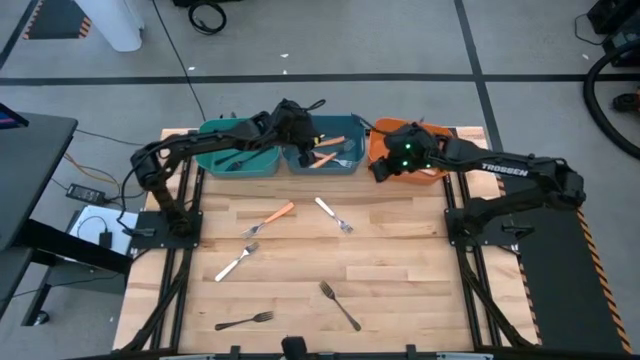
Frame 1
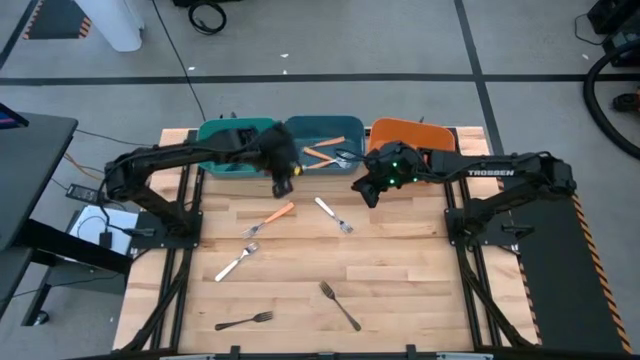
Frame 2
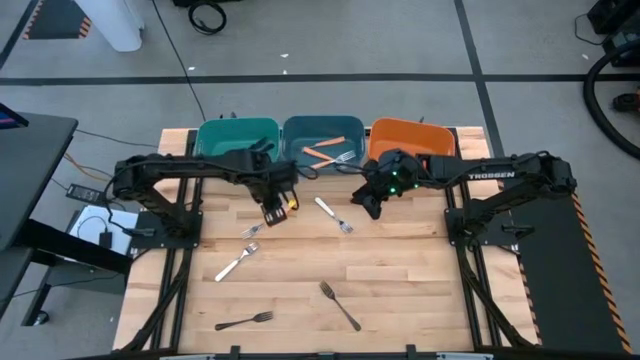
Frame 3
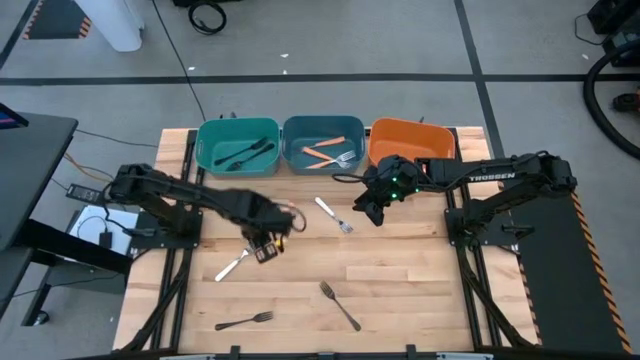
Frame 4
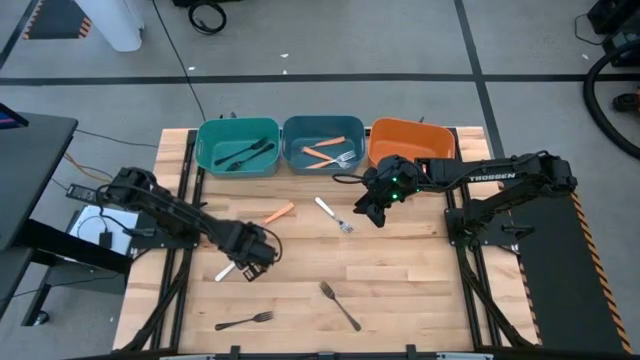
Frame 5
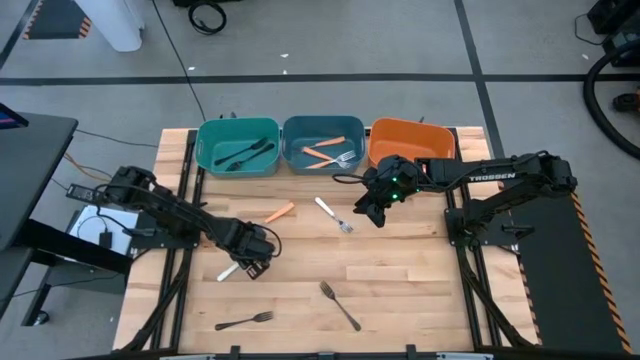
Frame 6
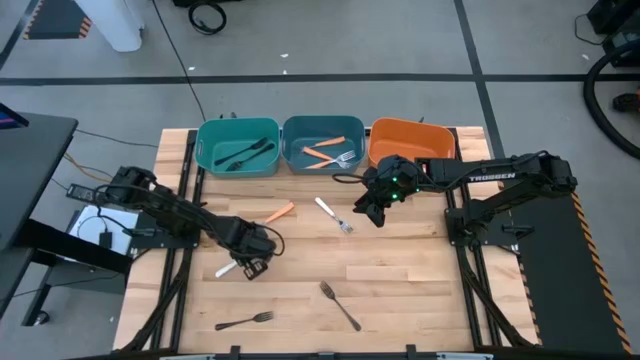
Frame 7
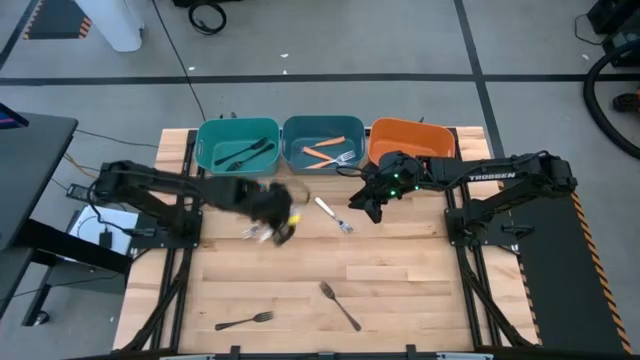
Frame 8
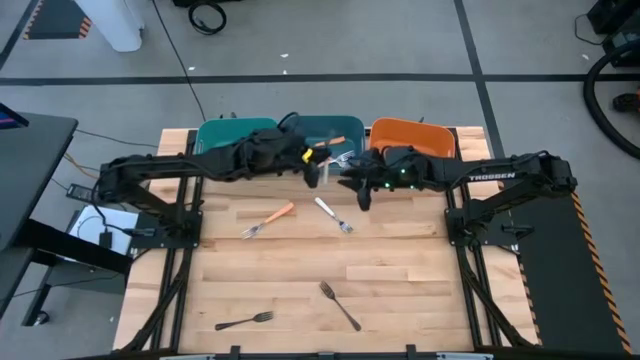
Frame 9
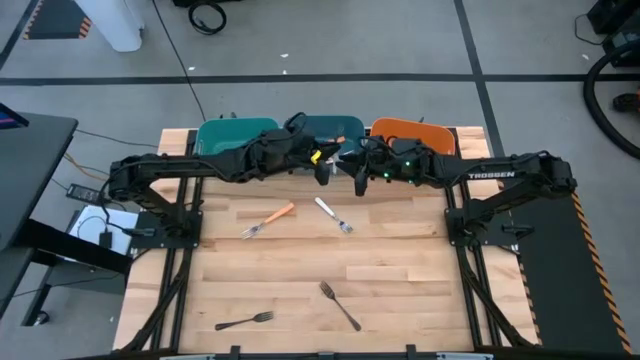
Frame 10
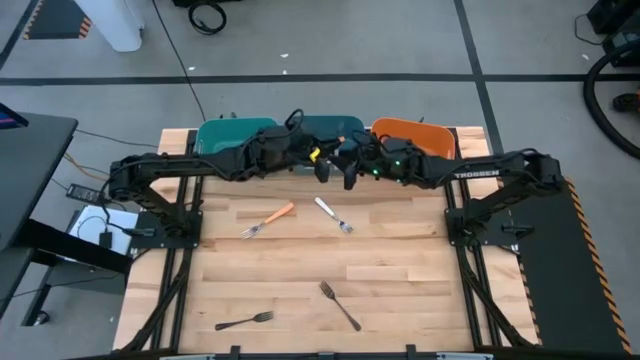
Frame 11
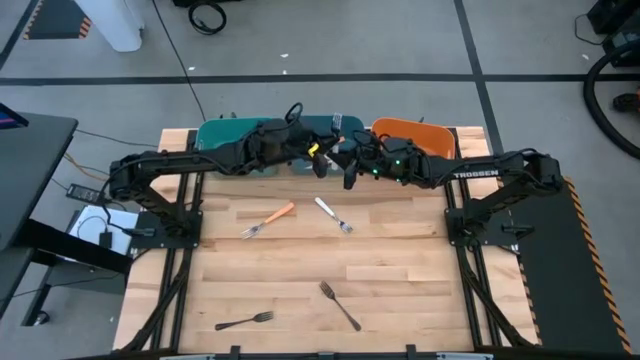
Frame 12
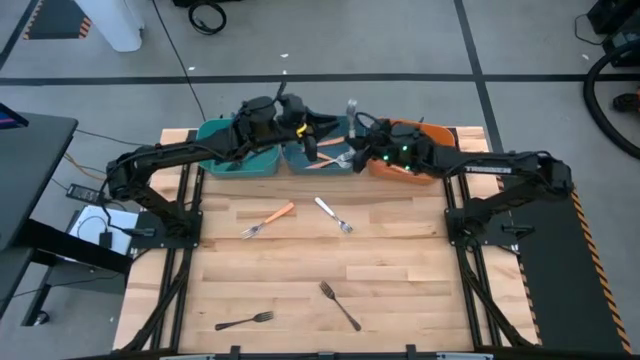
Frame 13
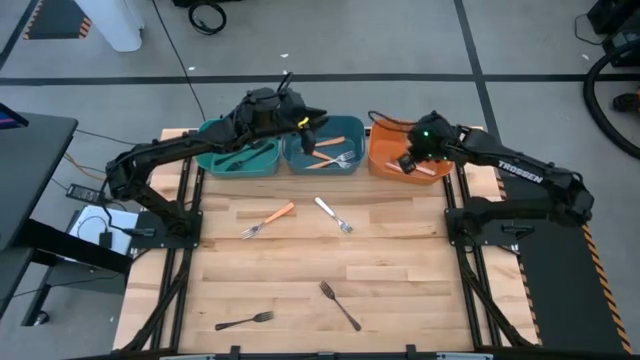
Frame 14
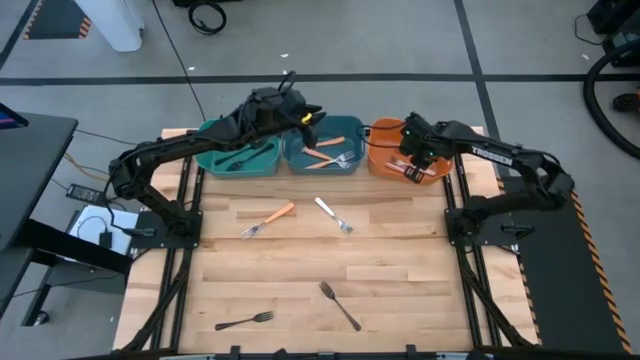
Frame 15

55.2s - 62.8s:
Task: Sort silverware by color (type)
Put the left white fork in the orange bin

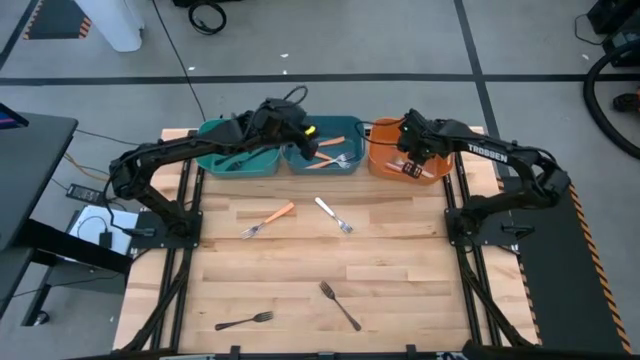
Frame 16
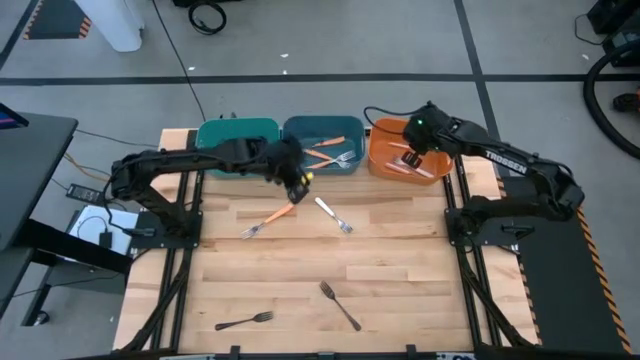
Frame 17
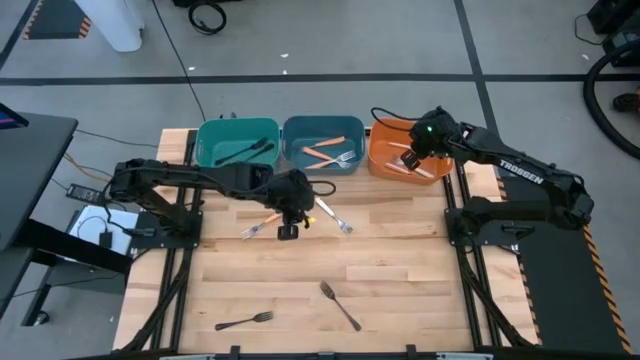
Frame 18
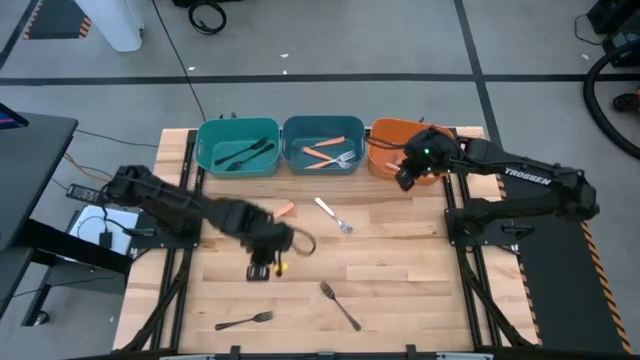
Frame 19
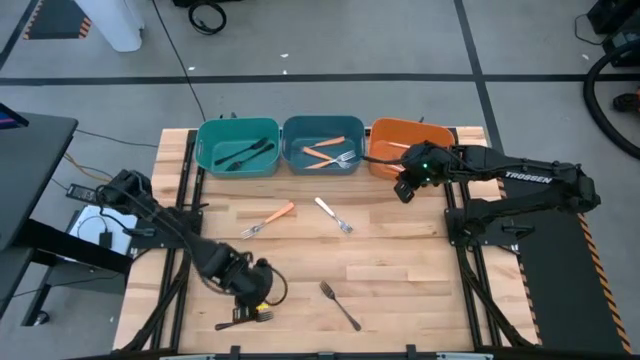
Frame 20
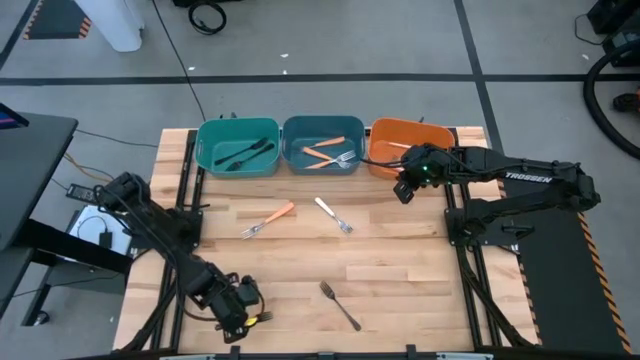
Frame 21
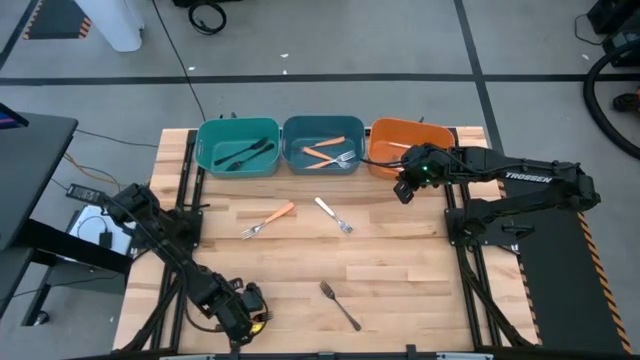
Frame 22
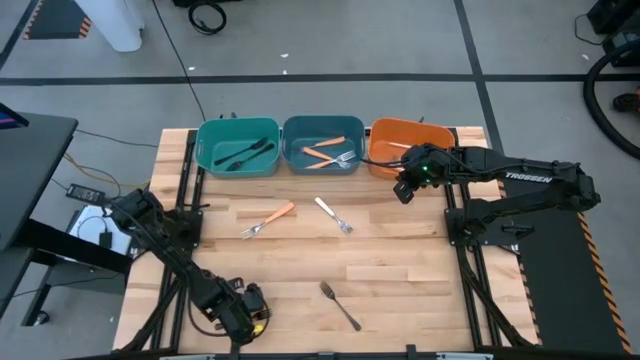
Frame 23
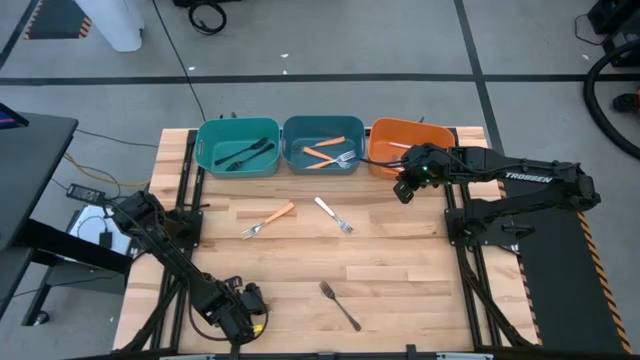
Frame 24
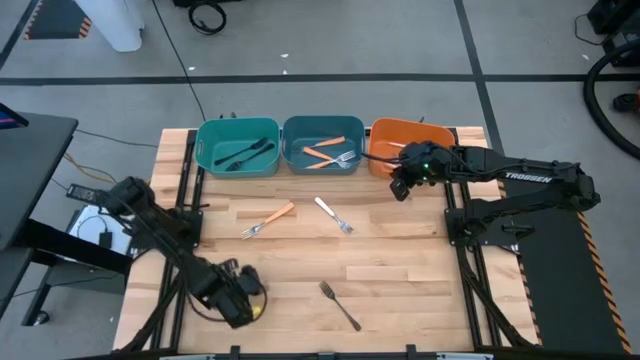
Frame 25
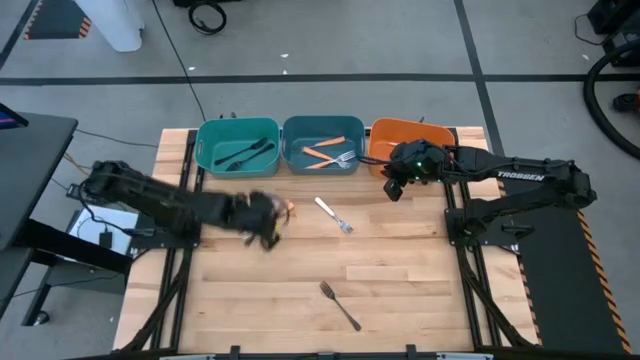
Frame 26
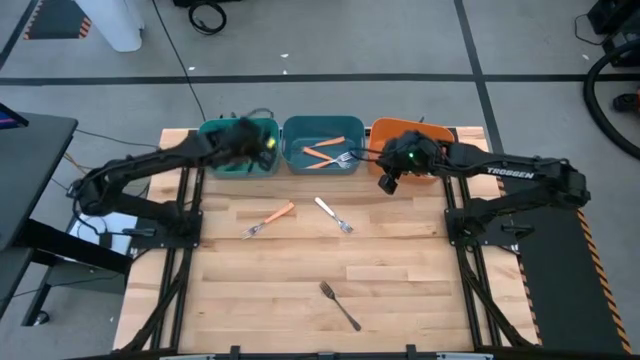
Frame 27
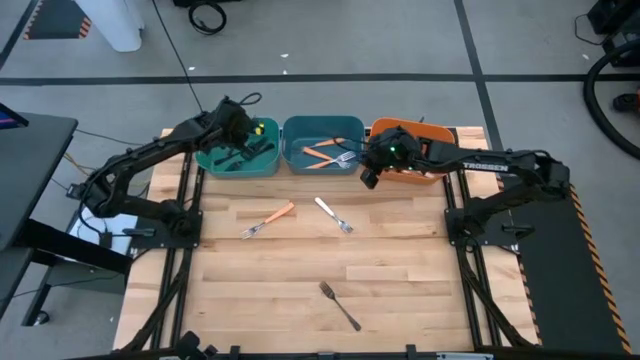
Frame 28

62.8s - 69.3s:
Put the left black fork in the green bin

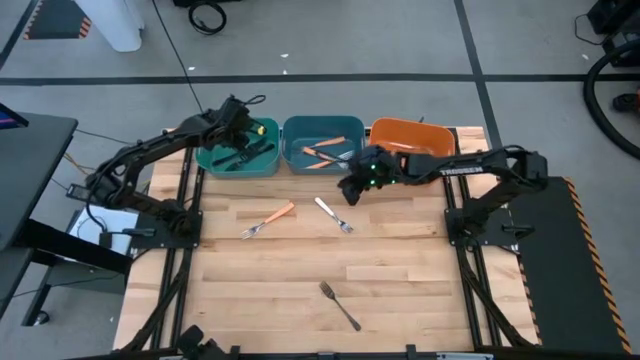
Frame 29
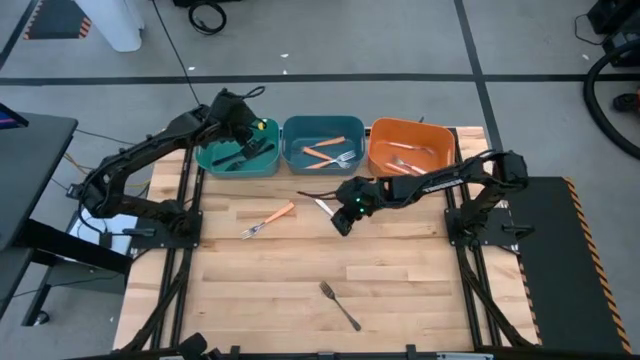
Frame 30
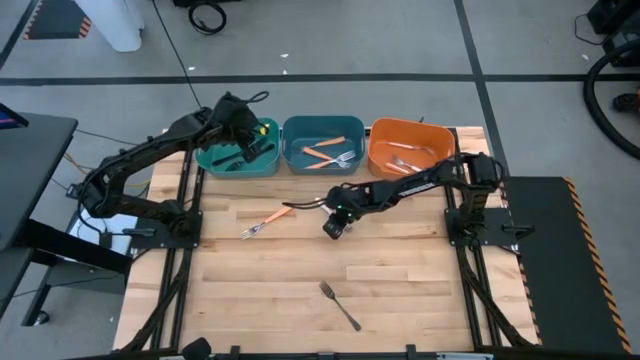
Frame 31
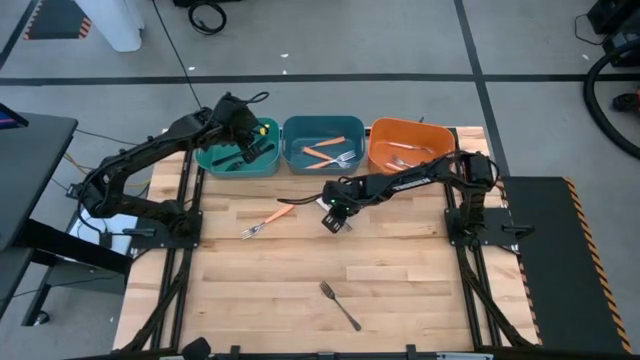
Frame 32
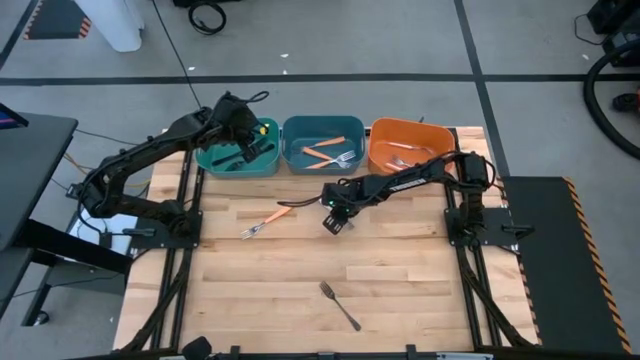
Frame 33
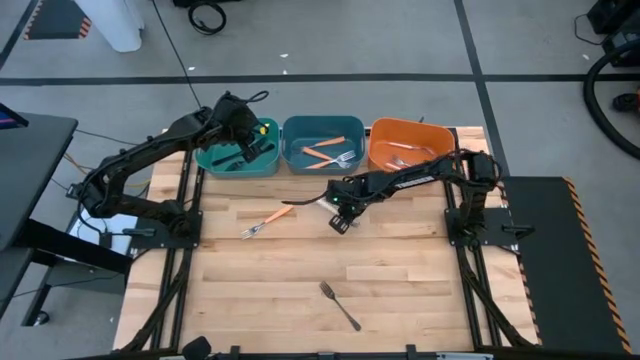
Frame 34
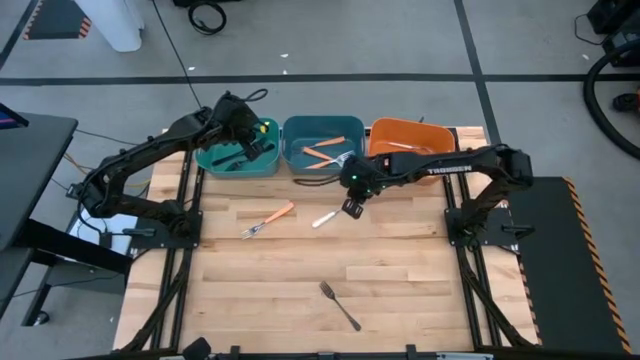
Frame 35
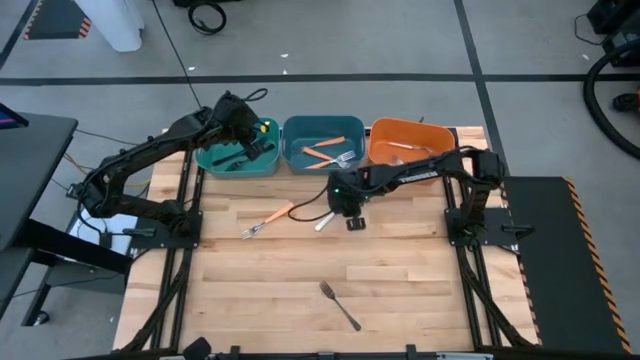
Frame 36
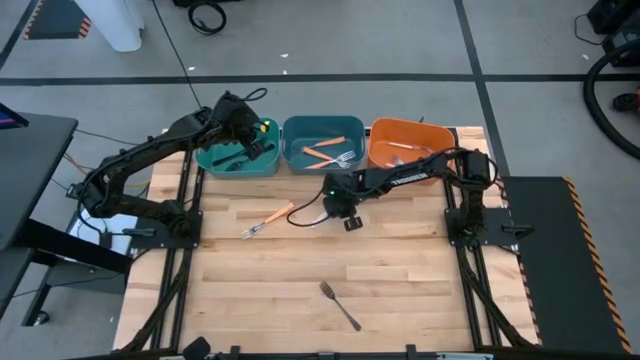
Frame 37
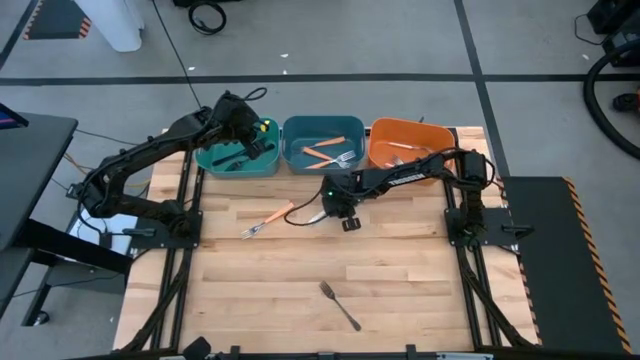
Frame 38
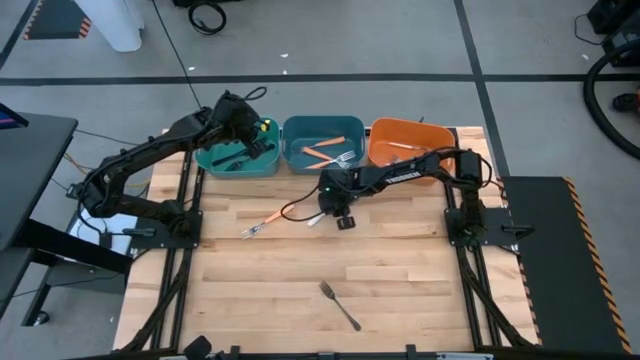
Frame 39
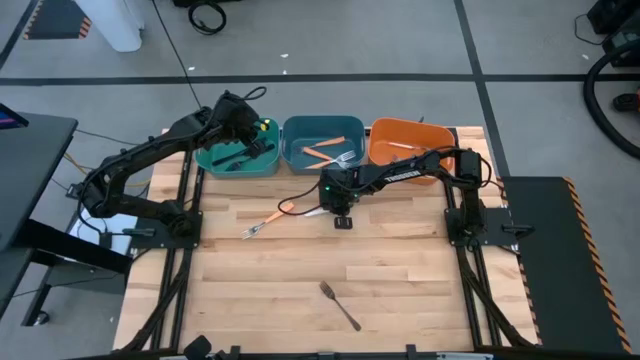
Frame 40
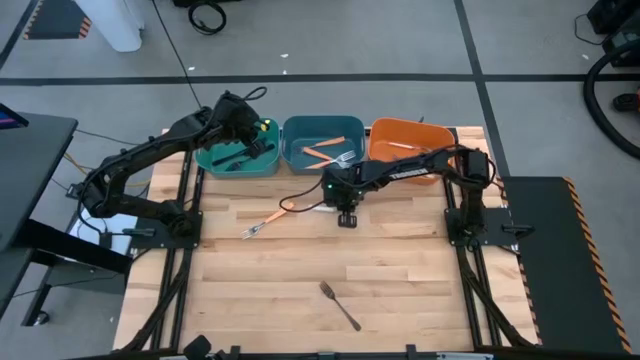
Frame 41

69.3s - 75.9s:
Put the white fork in the orange bin

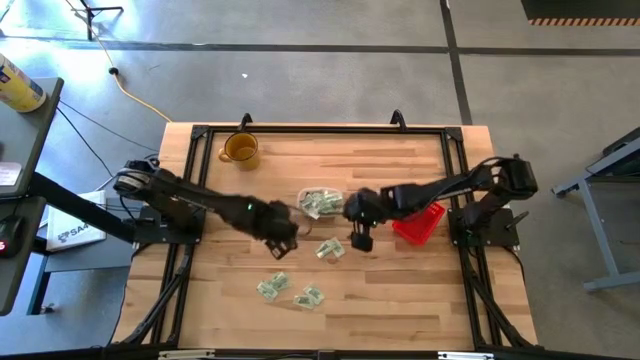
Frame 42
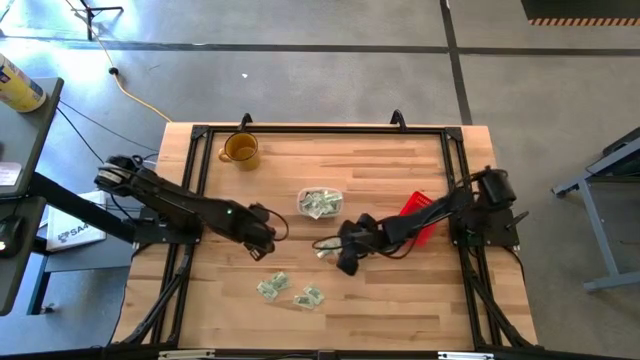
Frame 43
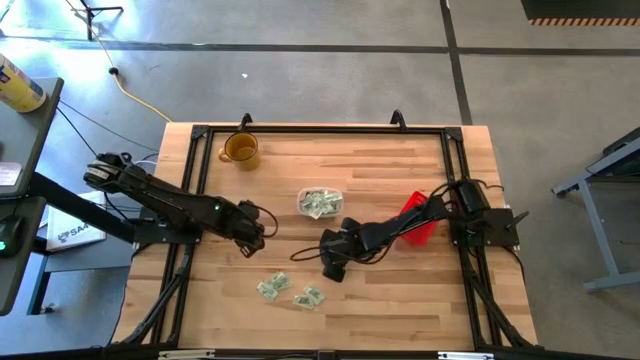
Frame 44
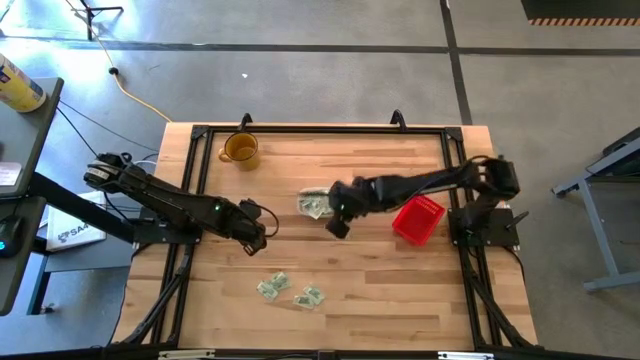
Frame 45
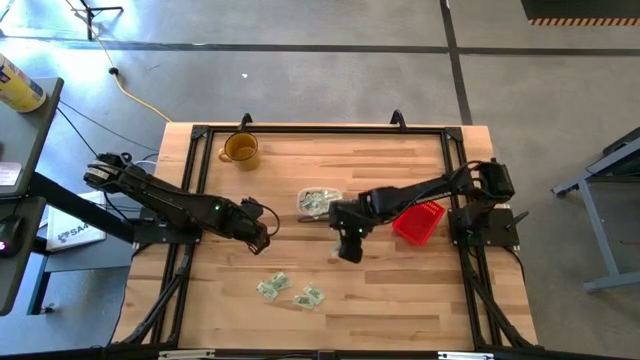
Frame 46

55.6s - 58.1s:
Task: Pick and place items into bin
Put the white stevia packet into the transparent bin
